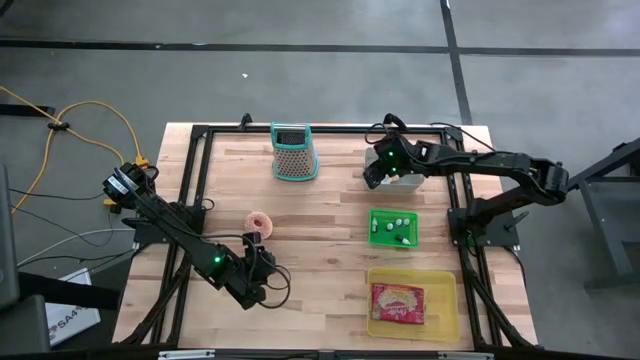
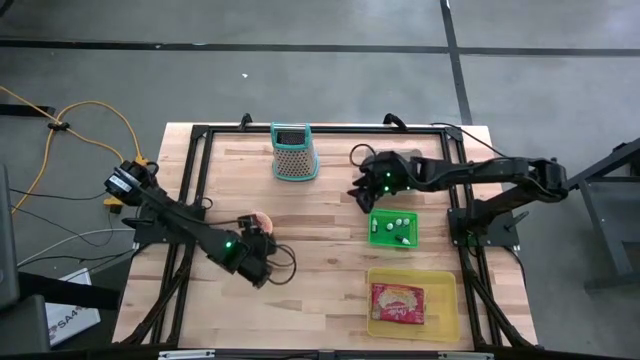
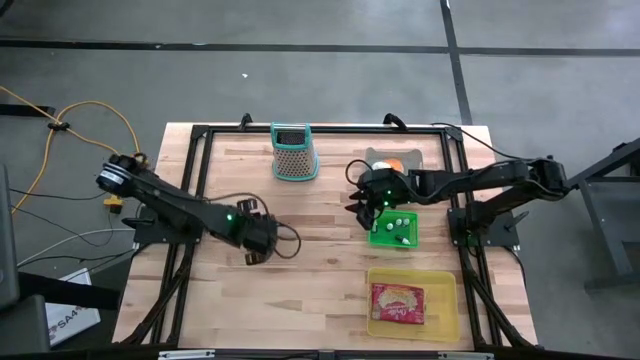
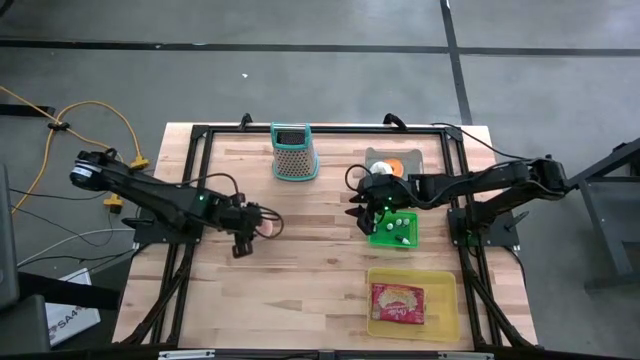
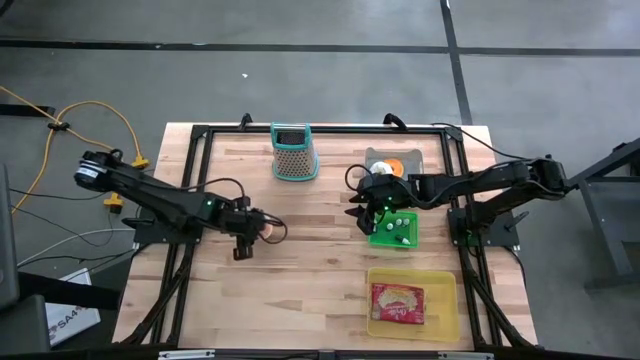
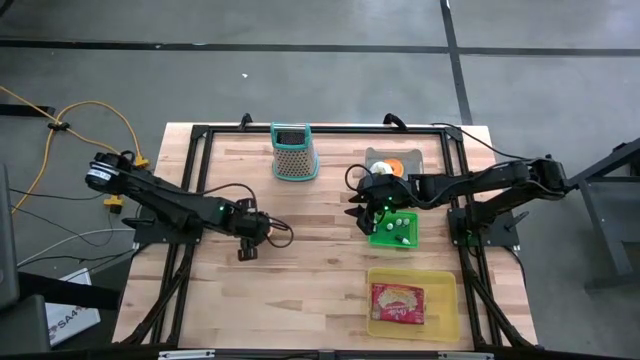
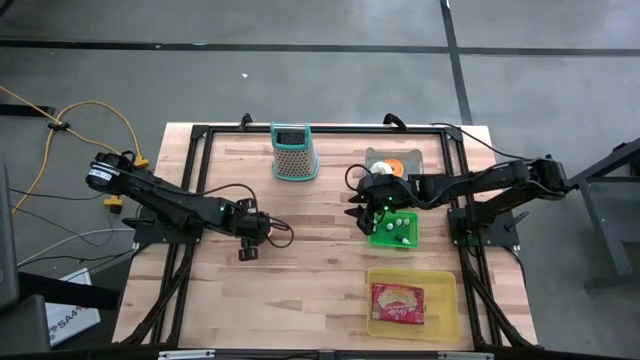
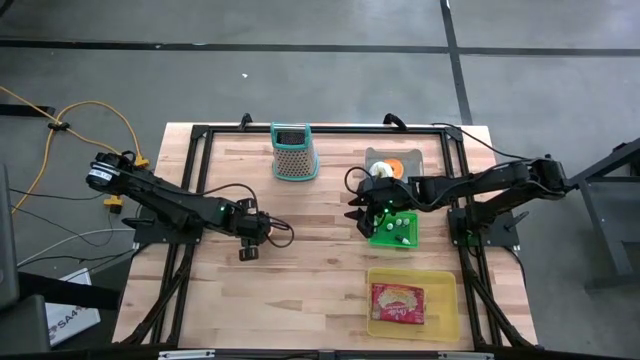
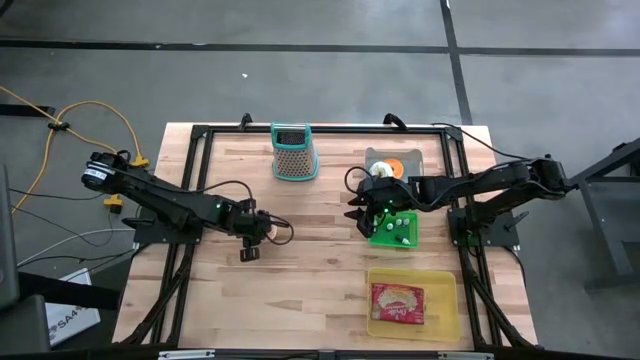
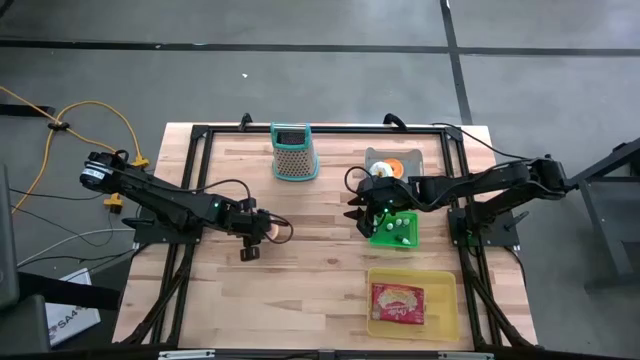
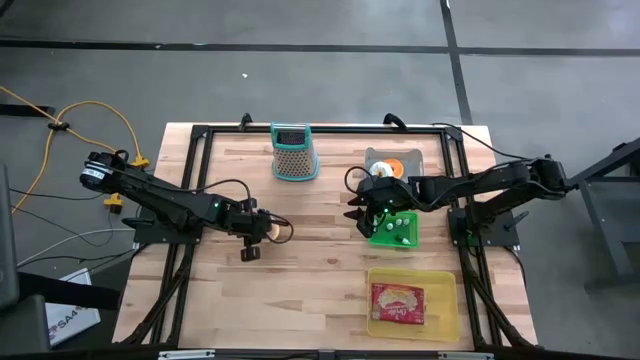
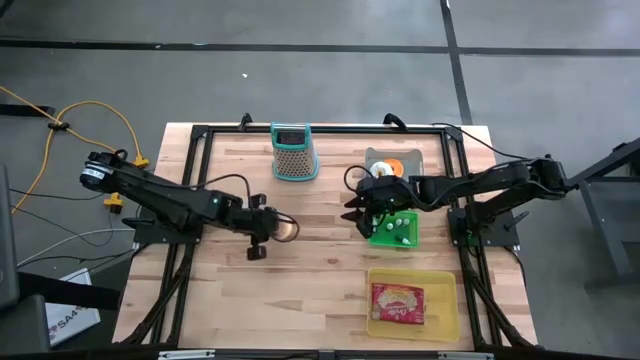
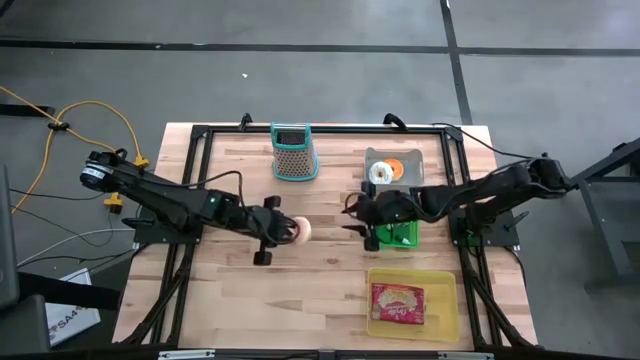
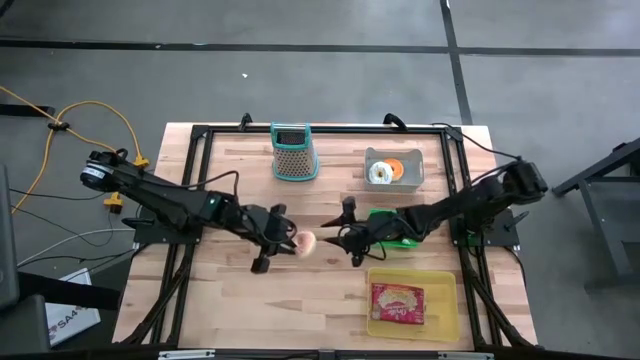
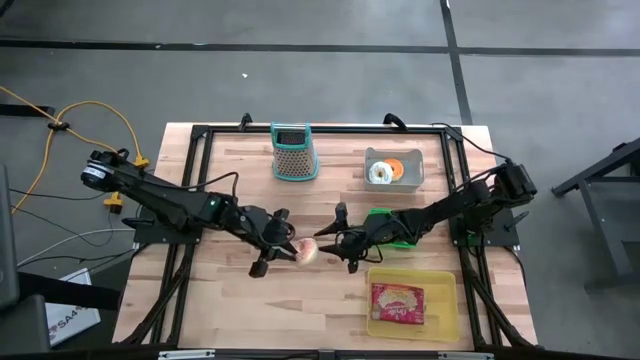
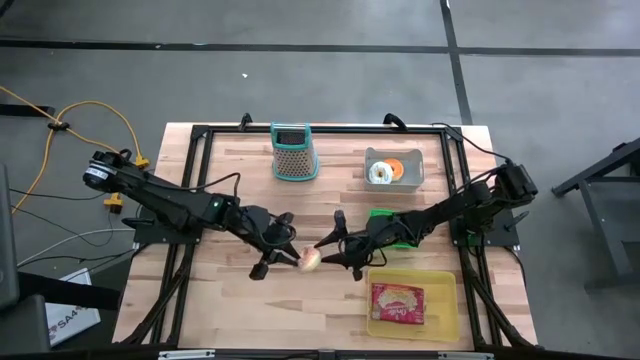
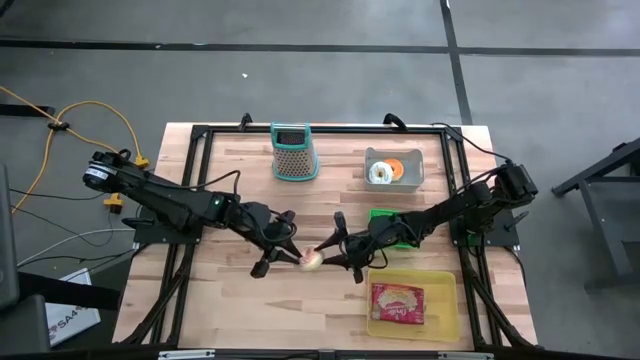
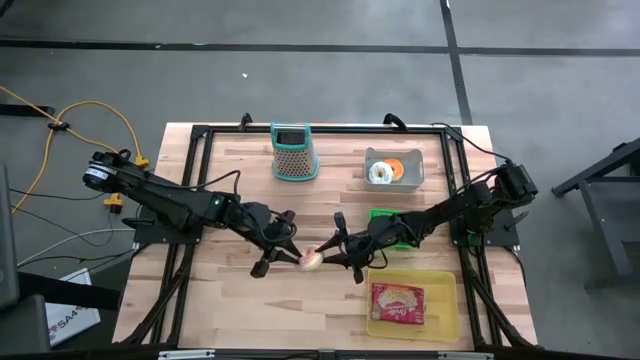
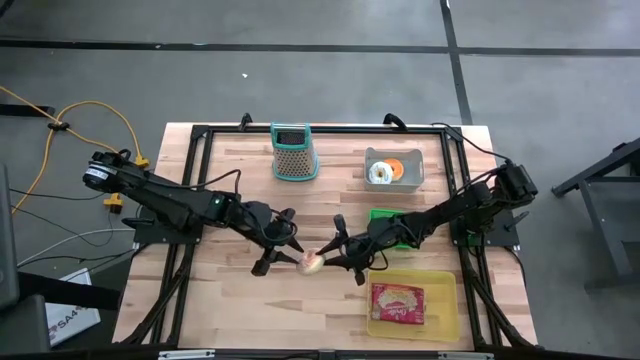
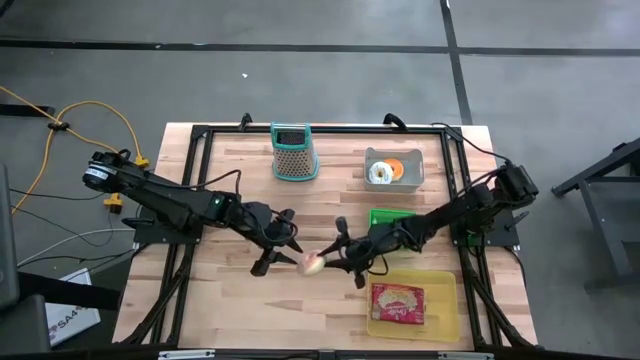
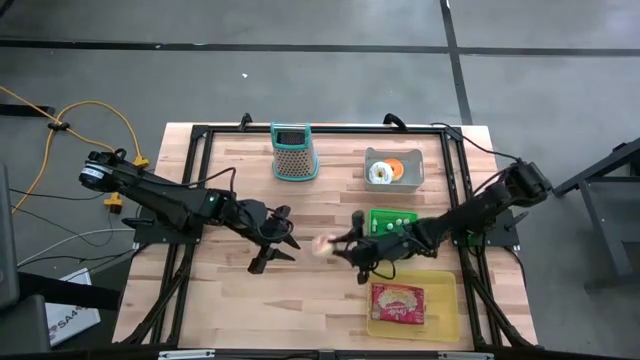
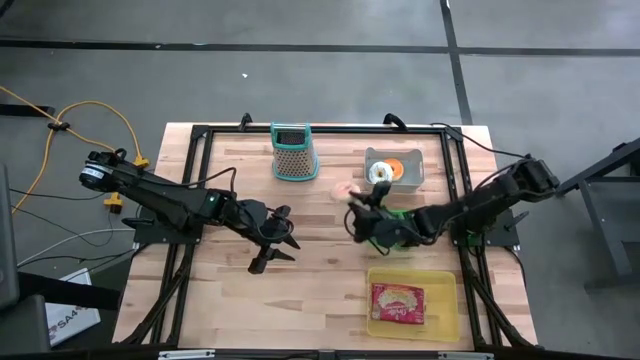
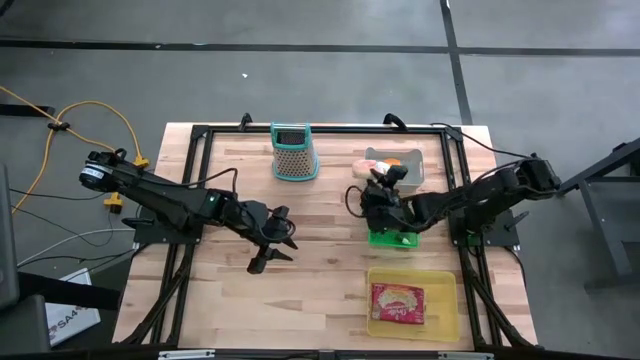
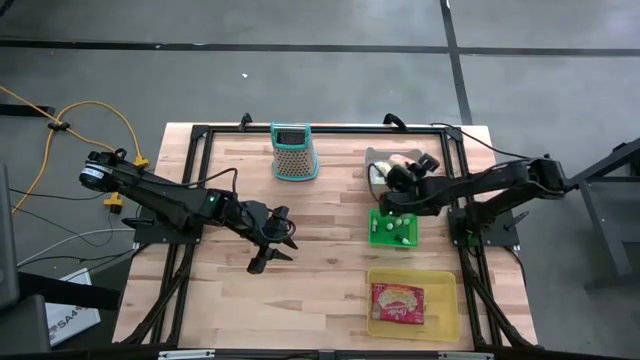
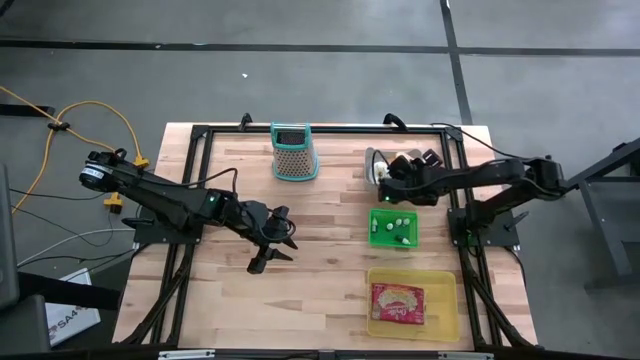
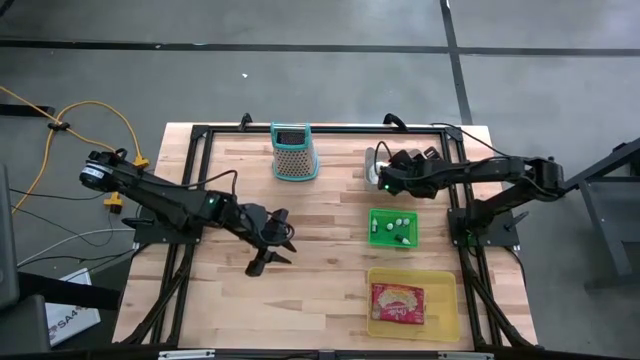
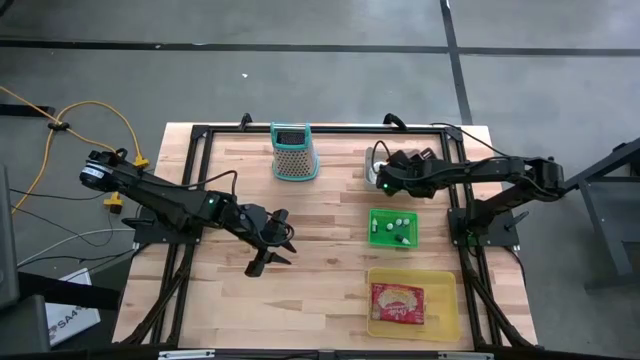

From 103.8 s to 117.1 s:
Put the pink donut into the gray bin
